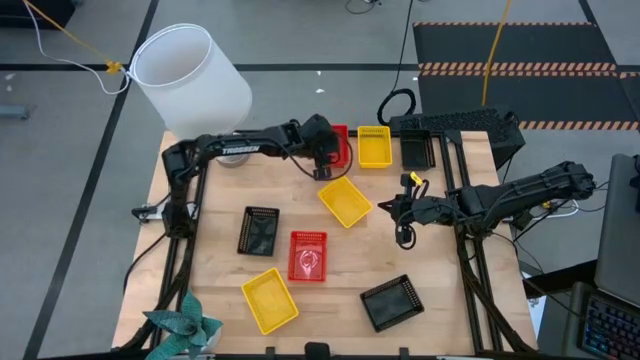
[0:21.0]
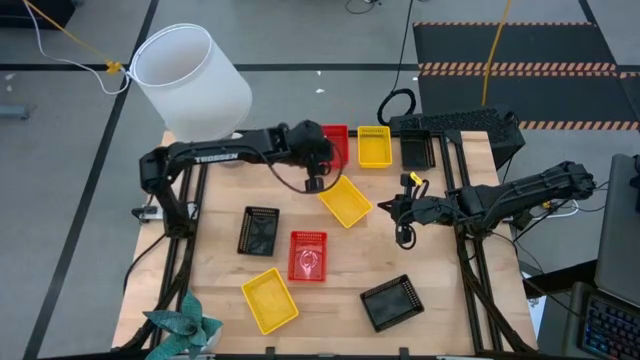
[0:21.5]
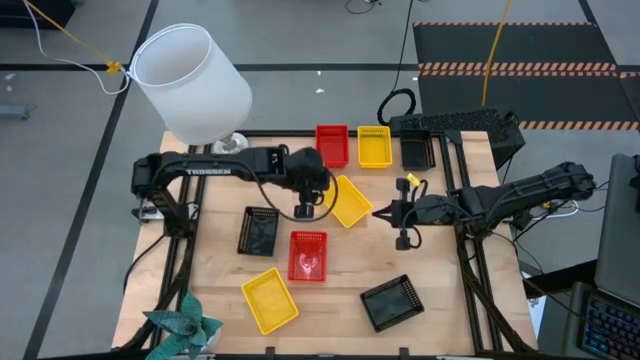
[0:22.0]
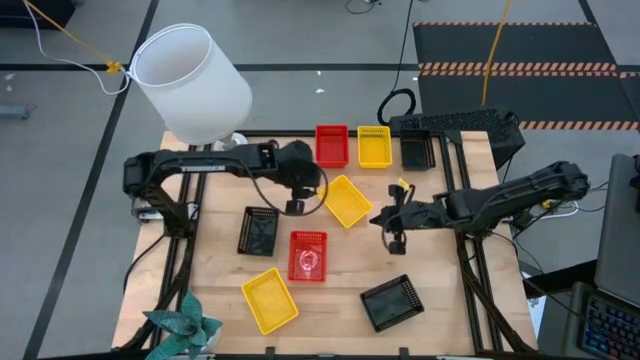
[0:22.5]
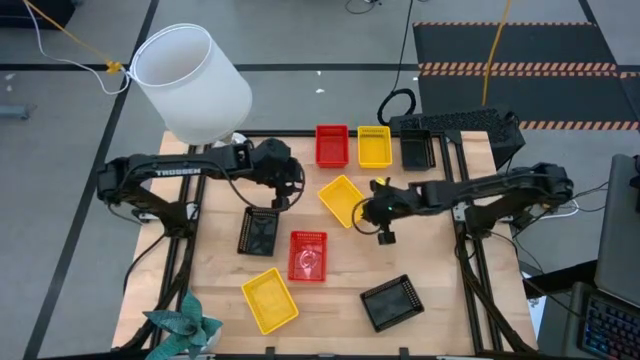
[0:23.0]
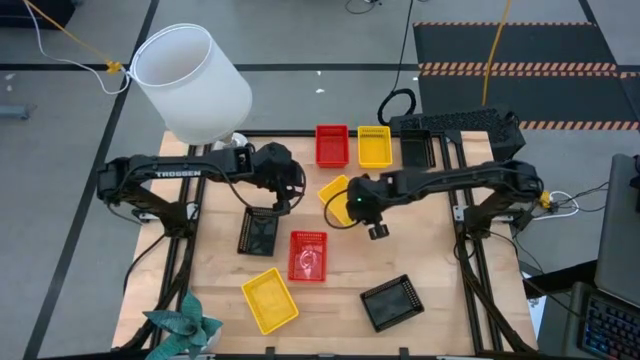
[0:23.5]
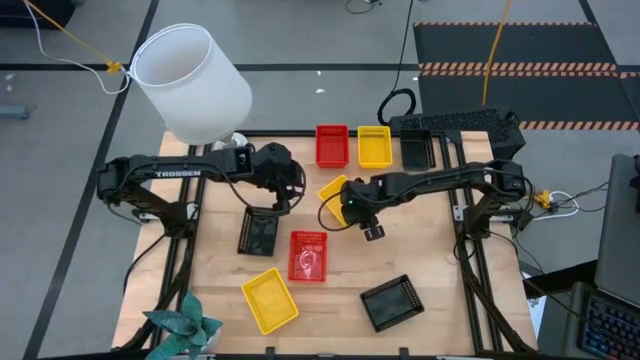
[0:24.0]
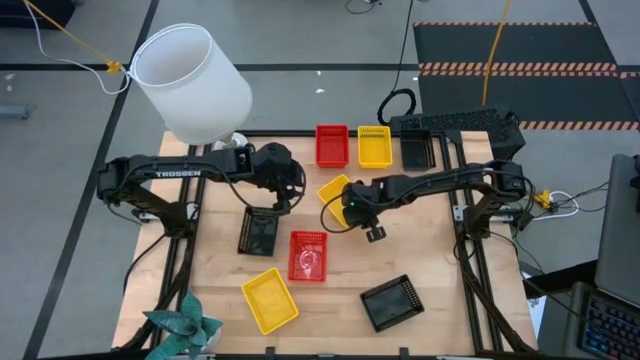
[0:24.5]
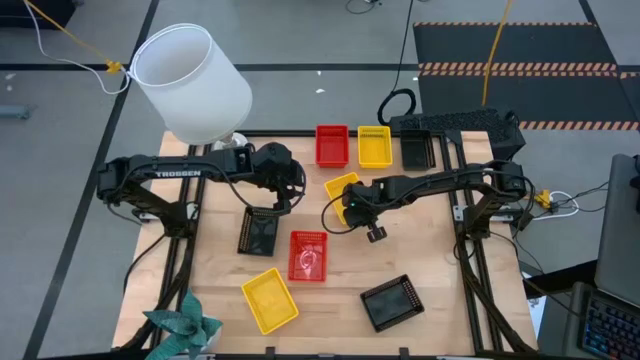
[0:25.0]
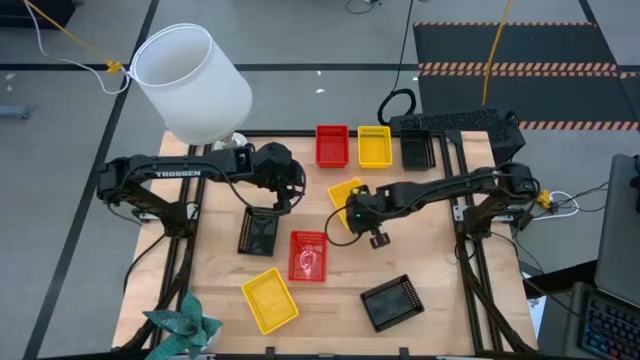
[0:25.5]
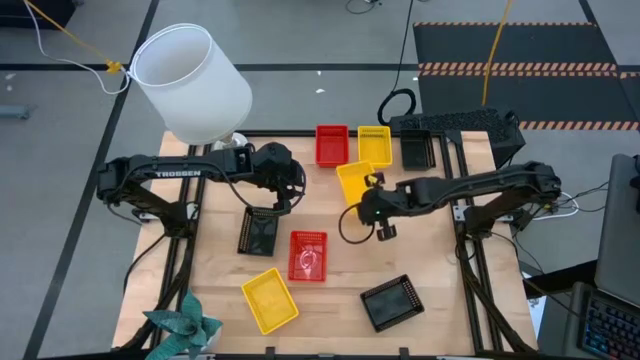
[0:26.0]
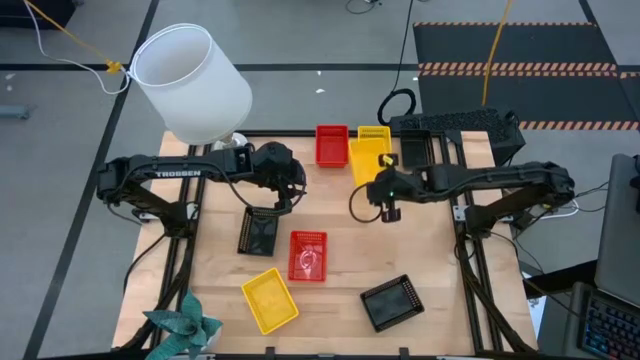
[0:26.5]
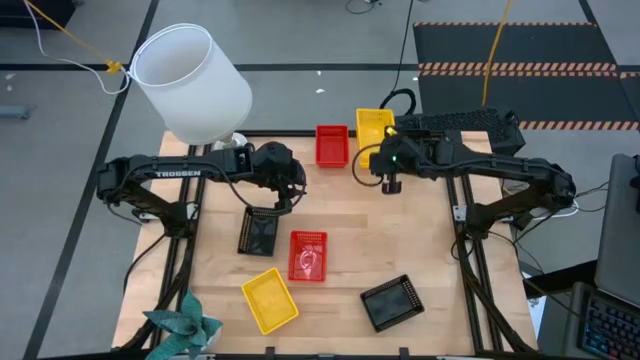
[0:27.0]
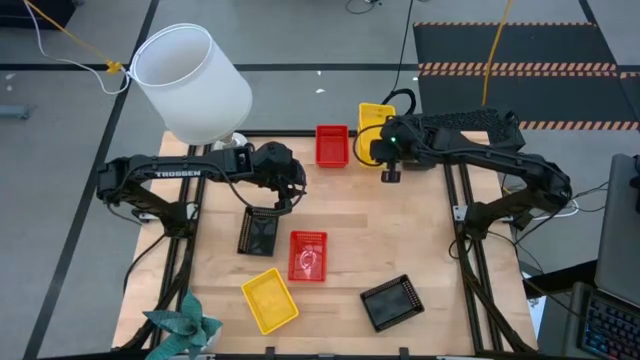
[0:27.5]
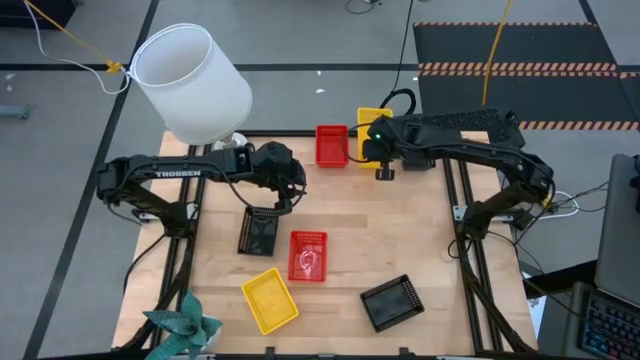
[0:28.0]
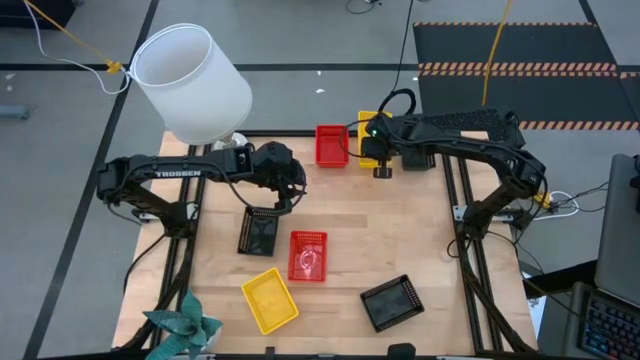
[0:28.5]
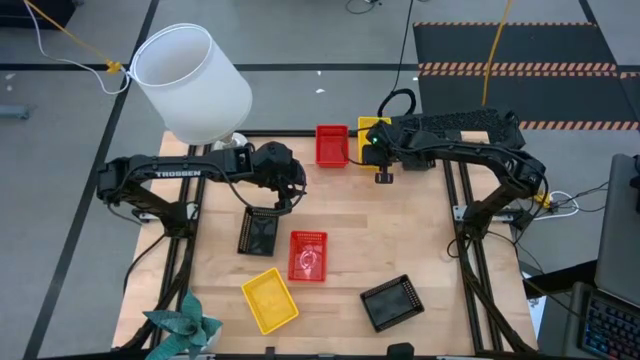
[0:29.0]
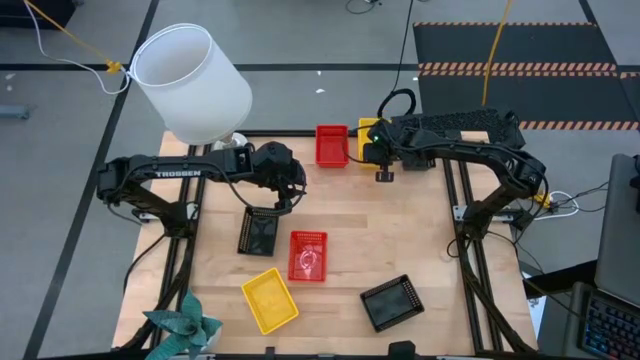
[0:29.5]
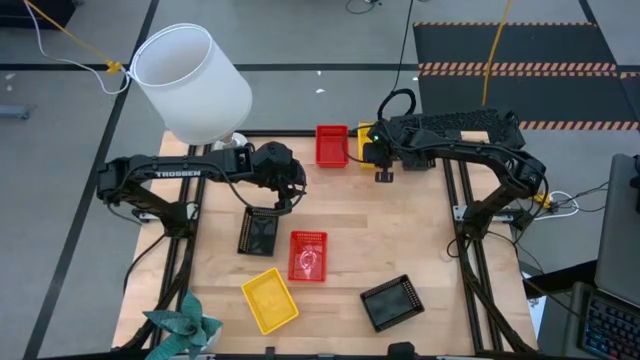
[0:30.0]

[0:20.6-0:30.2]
Stack the center yellow bin on top of the top yellow bin

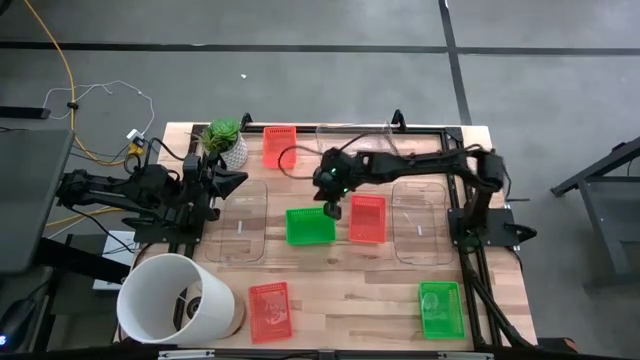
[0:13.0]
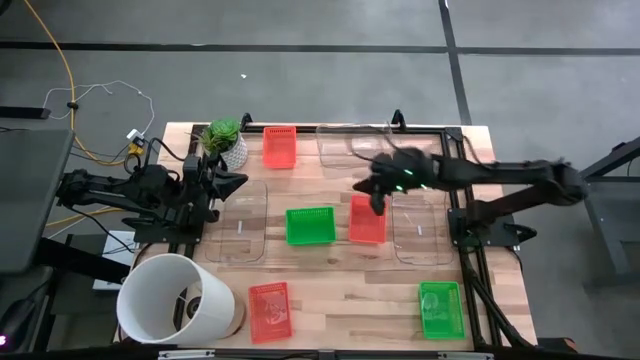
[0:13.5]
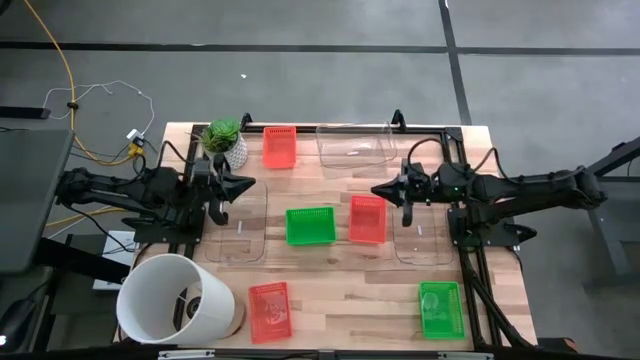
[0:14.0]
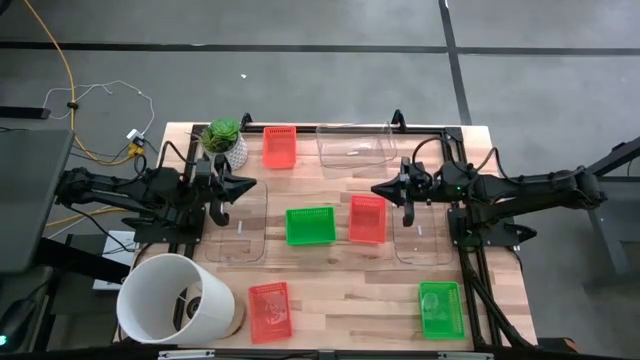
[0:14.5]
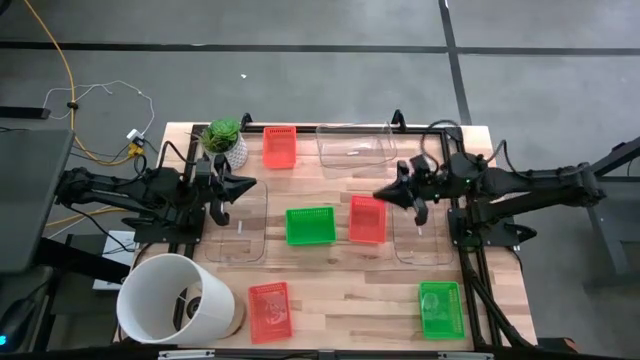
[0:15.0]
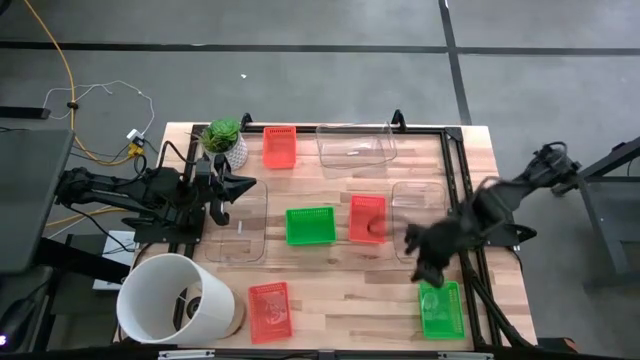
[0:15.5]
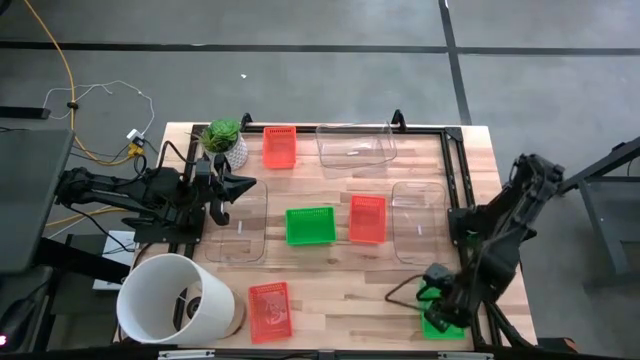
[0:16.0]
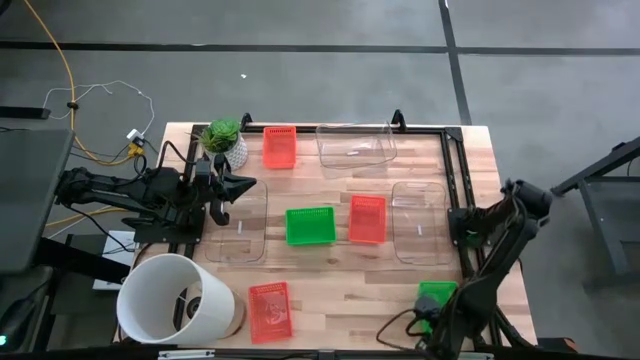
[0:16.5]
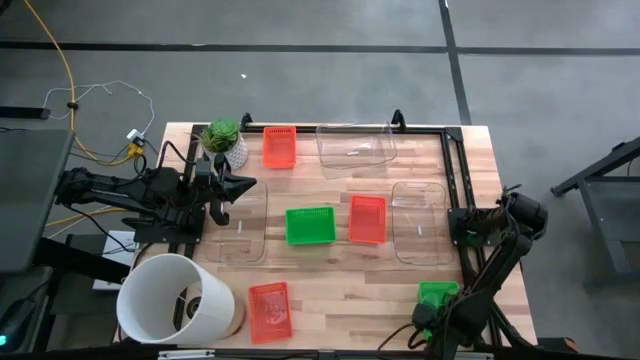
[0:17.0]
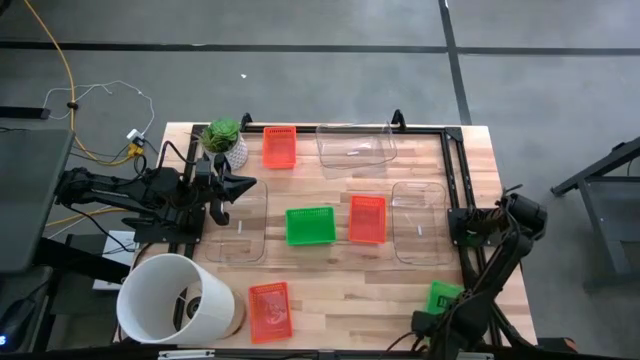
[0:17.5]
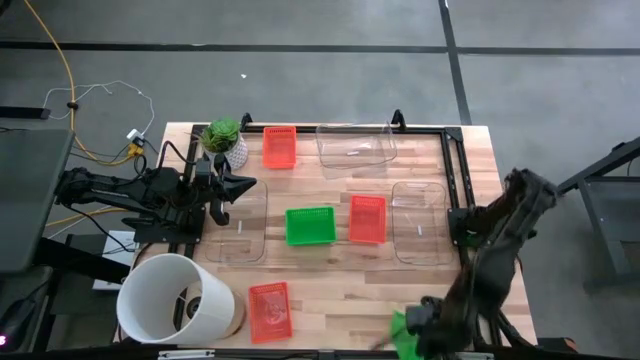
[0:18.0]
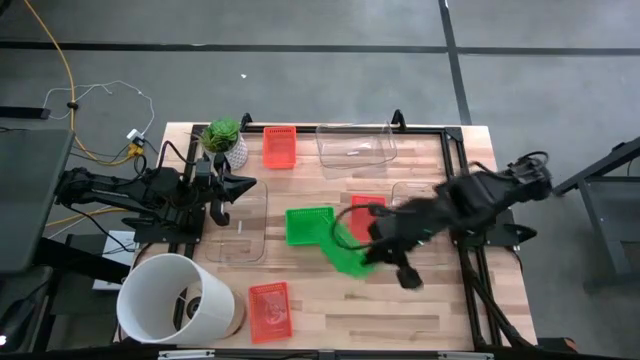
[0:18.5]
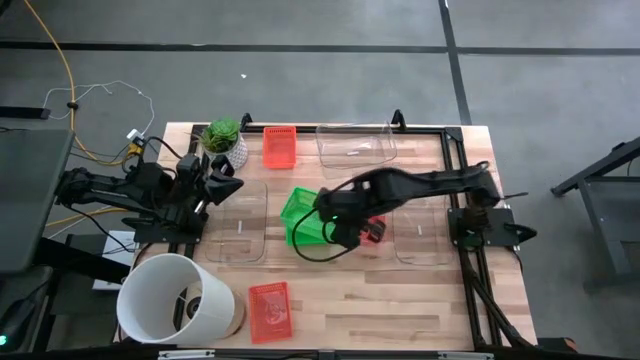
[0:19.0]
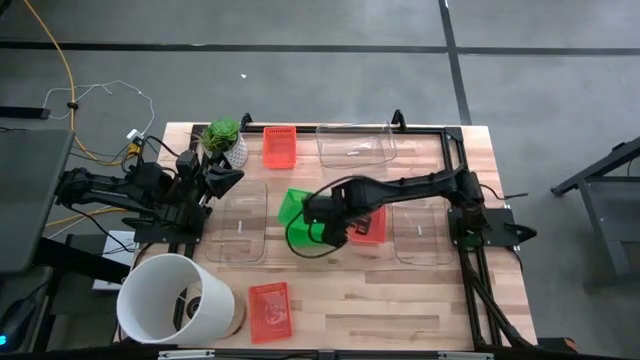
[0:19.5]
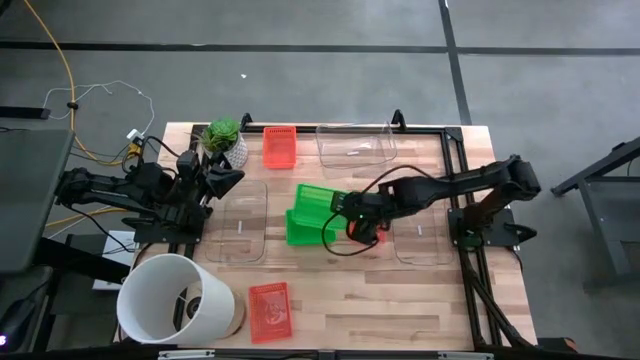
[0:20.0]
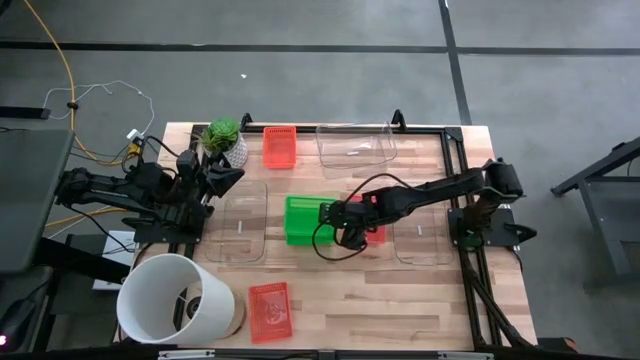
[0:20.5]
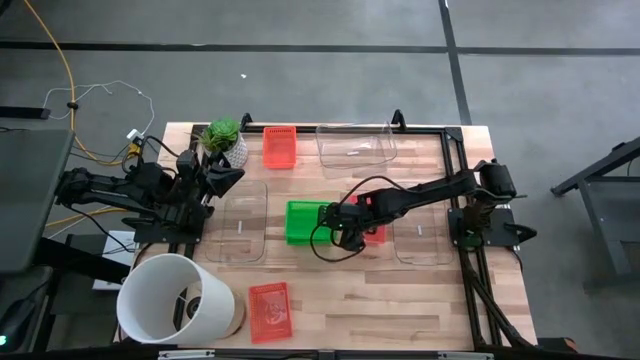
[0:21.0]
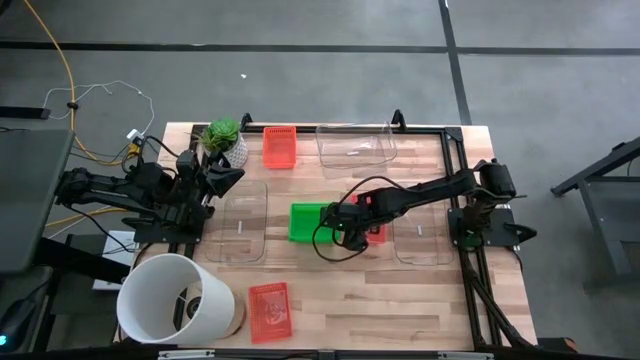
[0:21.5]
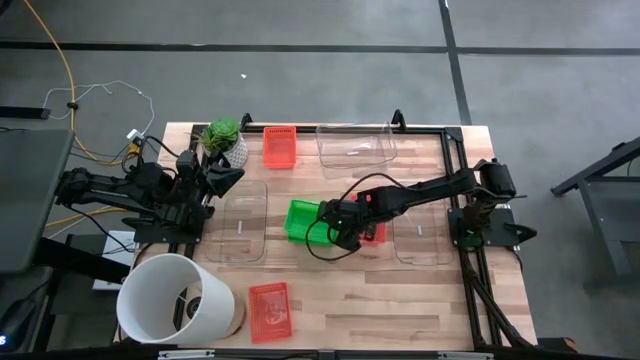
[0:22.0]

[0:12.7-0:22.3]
Stack the bottom green bin on the top green bin

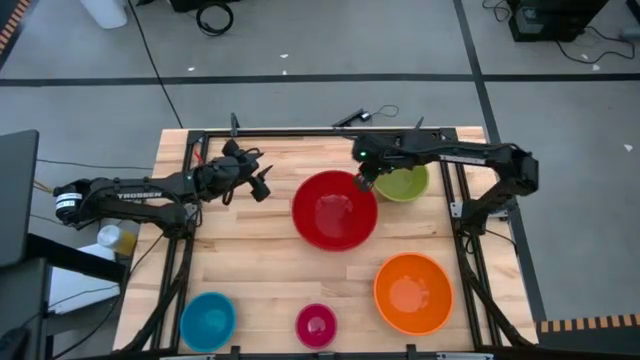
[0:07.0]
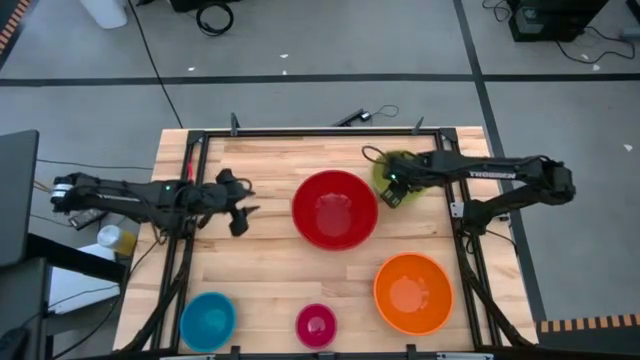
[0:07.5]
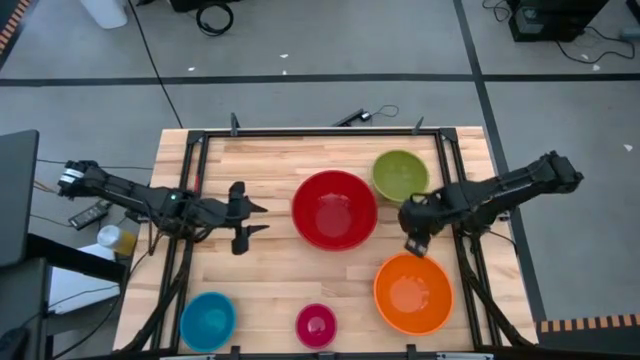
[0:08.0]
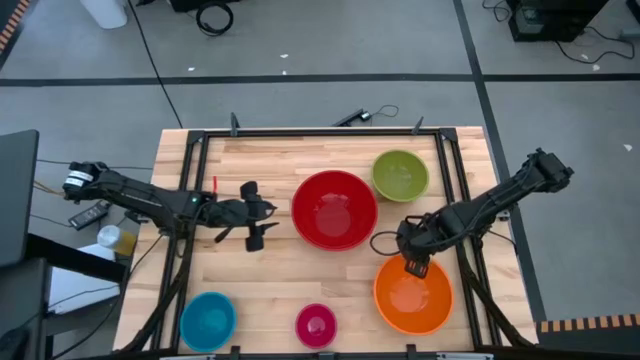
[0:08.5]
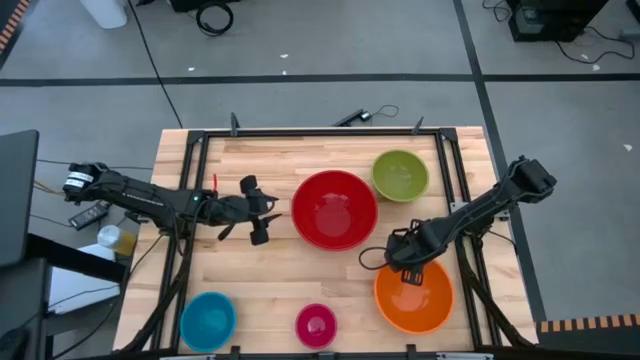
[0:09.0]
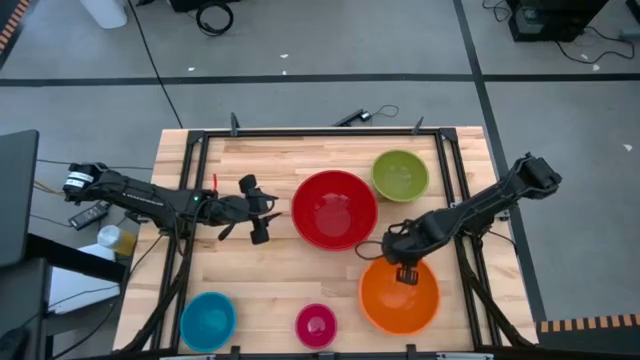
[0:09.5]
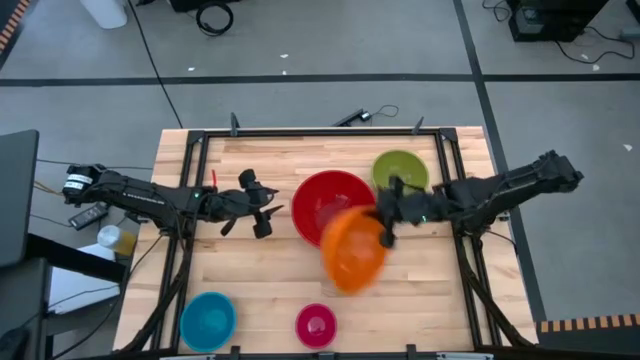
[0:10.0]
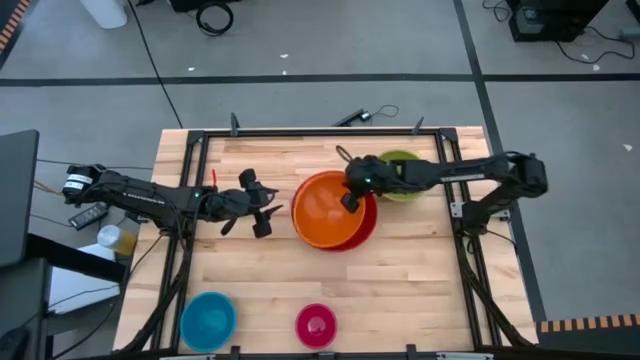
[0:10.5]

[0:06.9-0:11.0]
Stack the orange bowl on top of the red bowl
